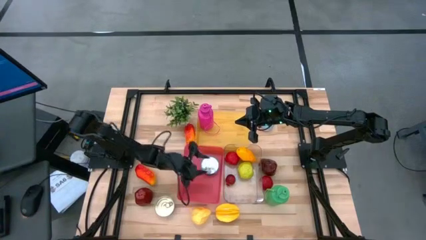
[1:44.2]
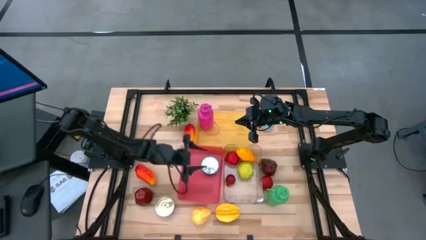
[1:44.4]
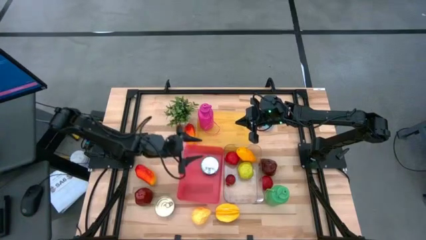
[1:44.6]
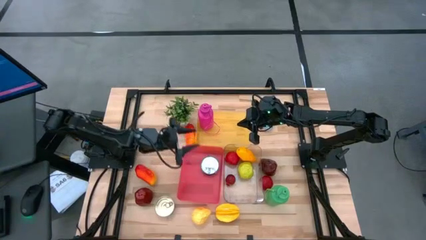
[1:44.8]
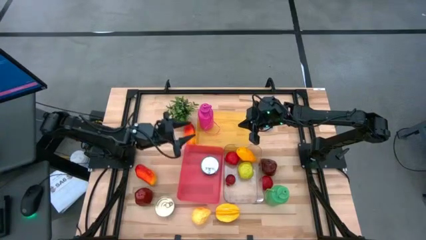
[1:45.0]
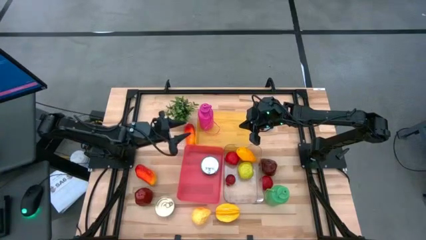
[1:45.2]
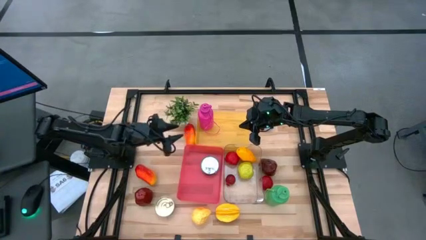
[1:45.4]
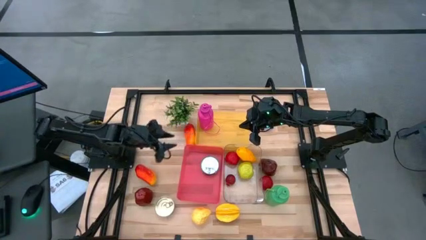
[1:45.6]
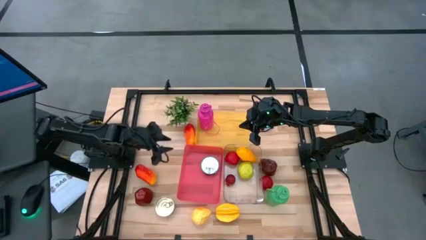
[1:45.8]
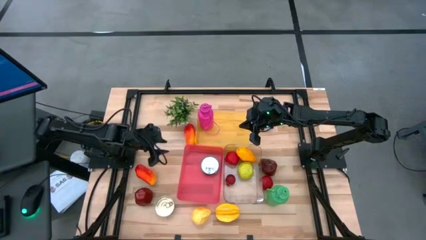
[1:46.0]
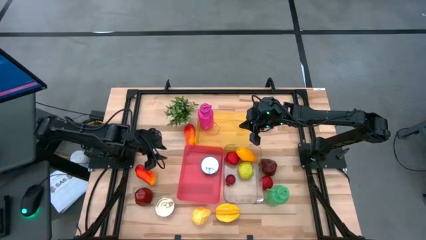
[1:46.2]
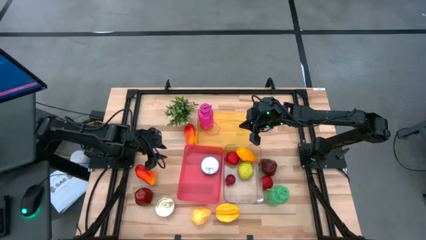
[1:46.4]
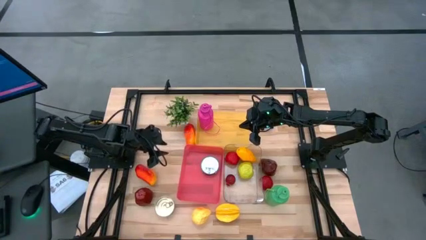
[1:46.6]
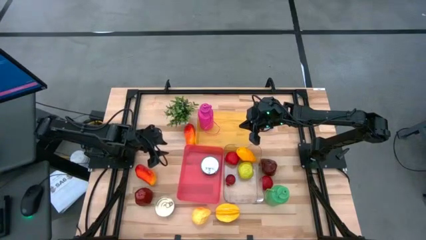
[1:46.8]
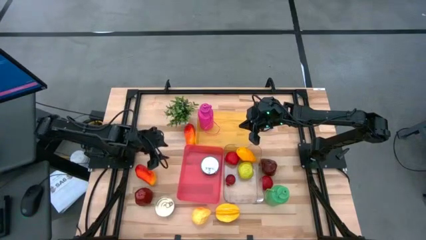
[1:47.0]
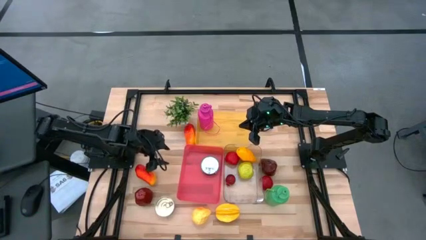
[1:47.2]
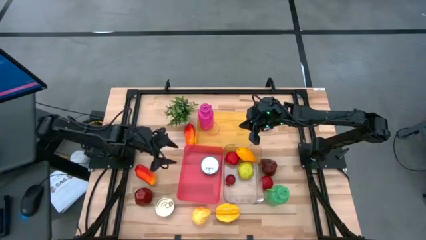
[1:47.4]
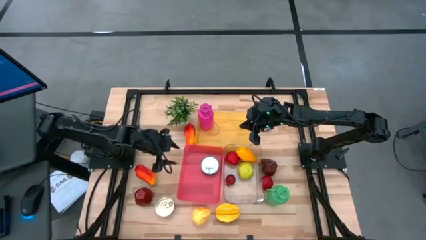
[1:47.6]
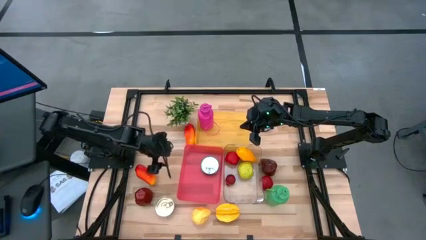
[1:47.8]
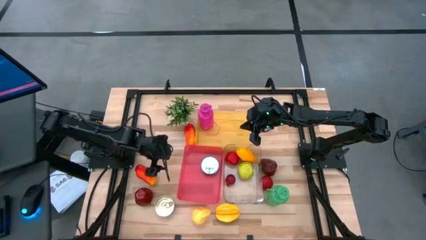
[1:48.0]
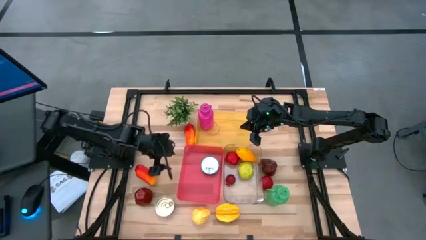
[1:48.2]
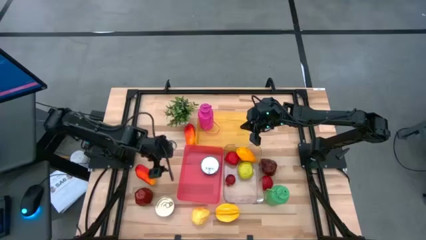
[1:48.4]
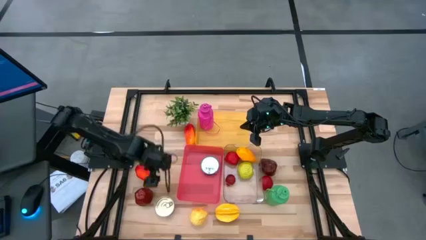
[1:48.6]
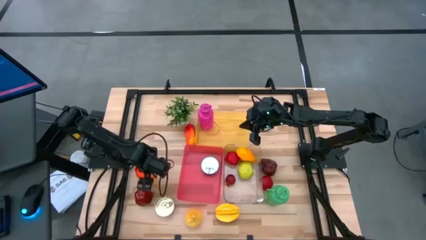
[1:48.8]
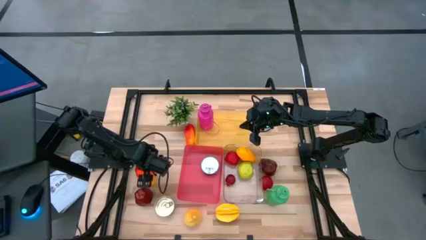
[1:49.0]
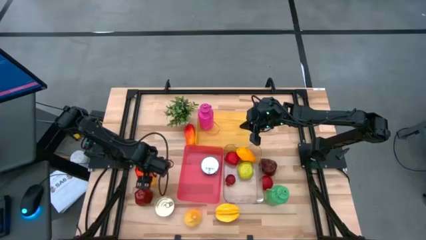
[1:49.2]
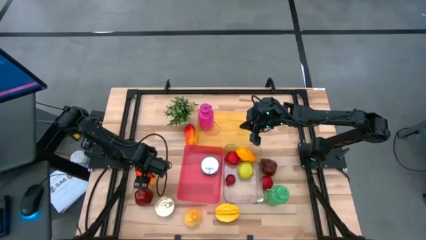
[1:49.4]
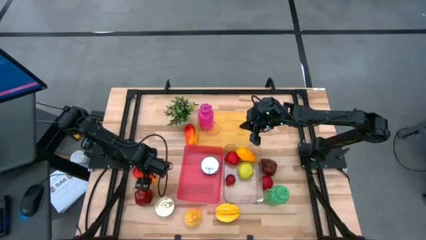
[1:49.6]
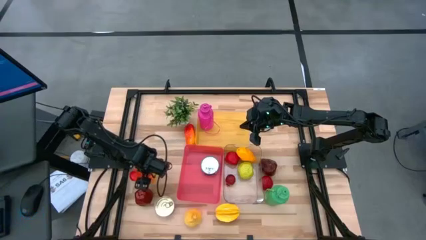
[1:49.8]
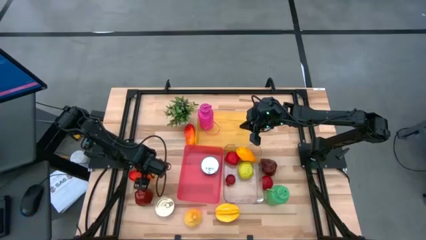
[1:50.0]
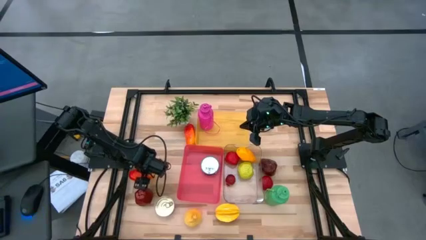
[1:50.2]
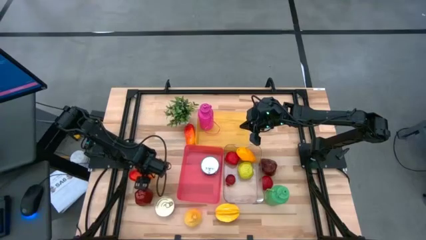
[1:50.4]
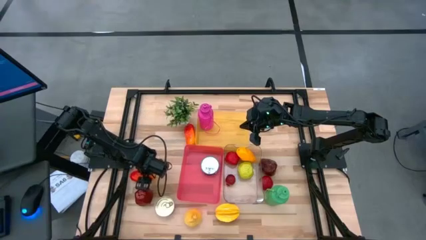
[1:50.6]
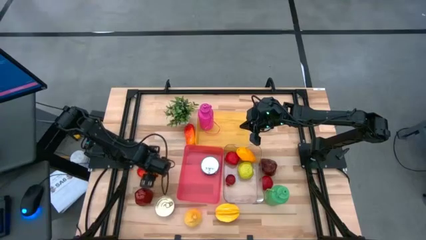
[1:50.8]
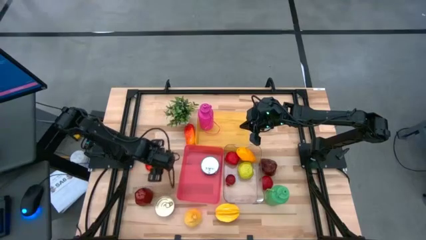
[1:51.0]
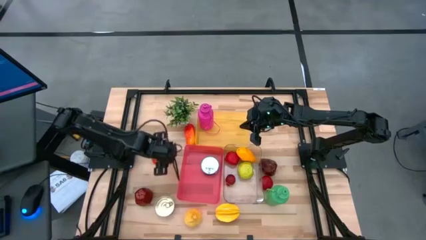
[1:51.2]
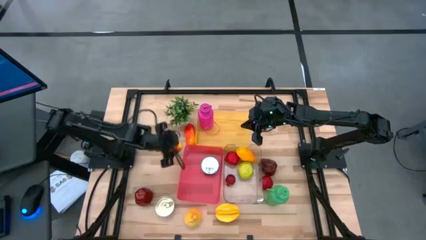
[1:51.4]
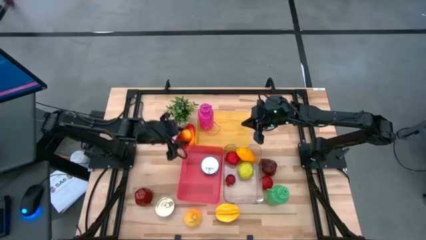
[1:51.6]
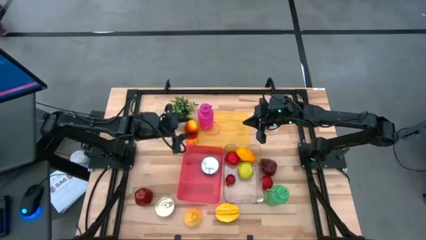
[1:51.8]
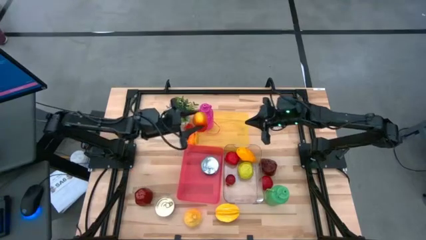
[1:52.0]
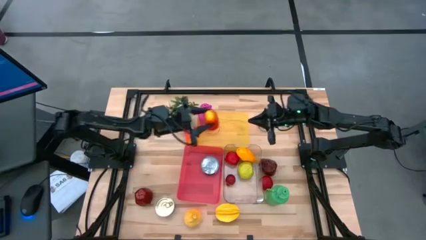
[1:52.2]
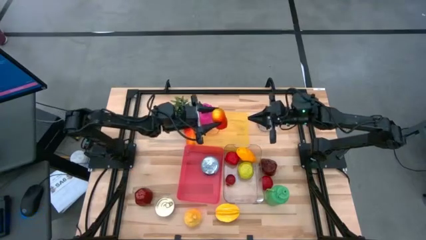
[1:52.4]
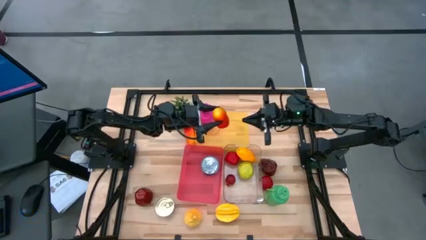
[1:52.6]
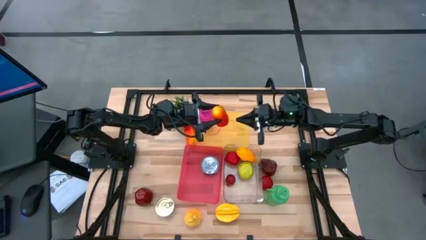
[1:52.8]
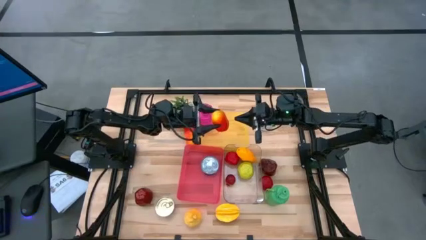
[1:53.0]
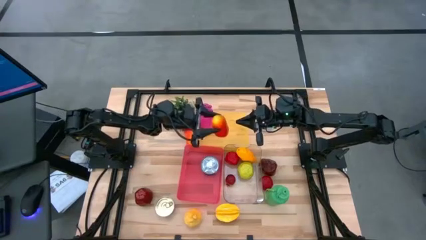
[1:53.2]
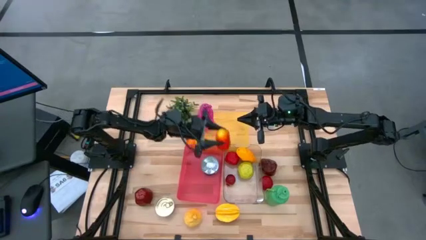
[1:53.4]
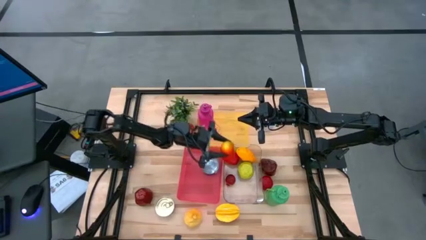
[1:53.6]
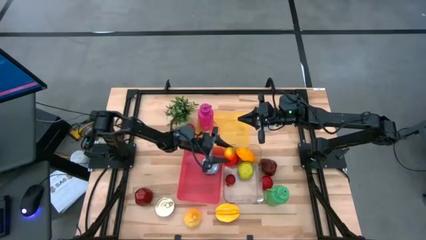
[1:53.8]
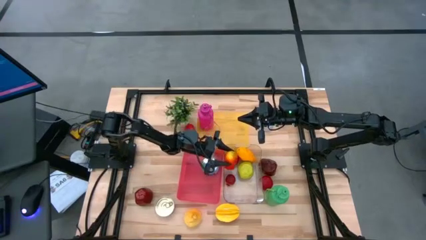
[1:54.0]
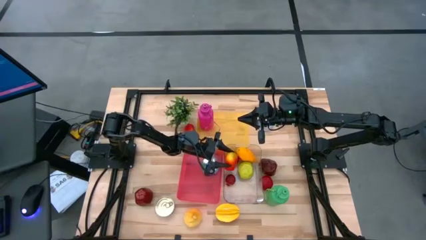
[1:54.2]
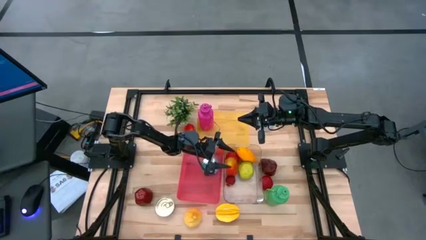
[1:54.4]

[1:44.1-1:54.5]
Task: Pick & Place Food Item
Put the bottom mango on the left into the transparent bin

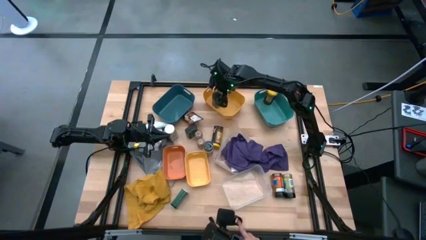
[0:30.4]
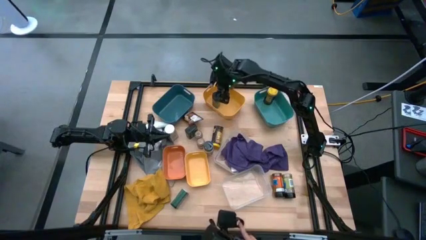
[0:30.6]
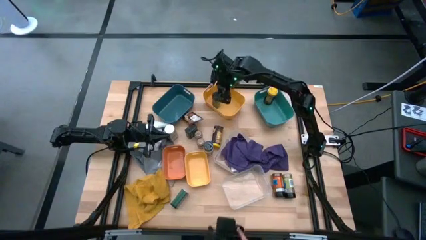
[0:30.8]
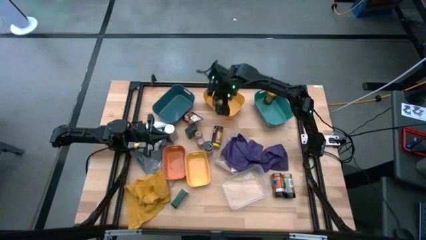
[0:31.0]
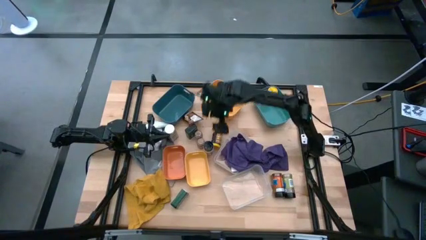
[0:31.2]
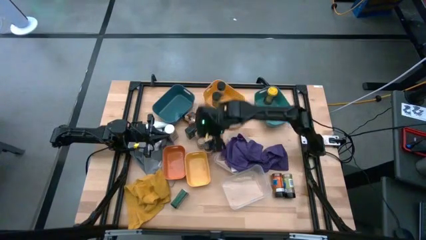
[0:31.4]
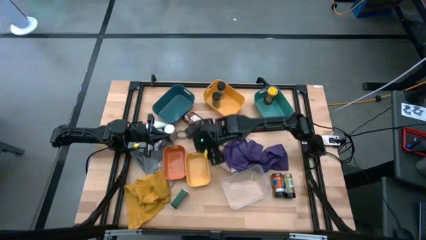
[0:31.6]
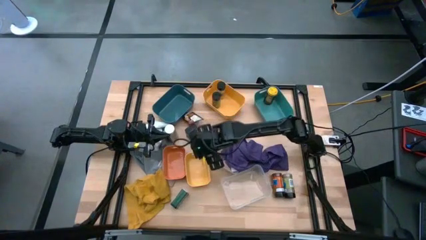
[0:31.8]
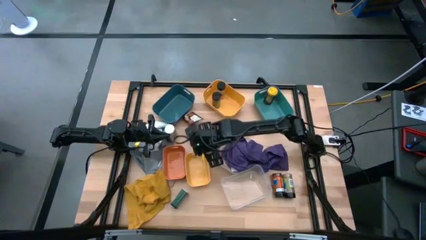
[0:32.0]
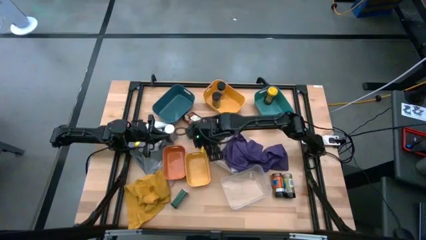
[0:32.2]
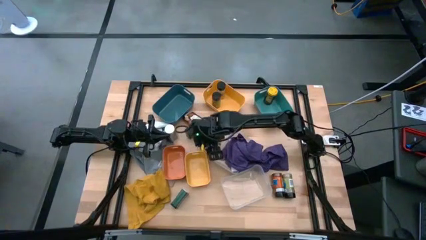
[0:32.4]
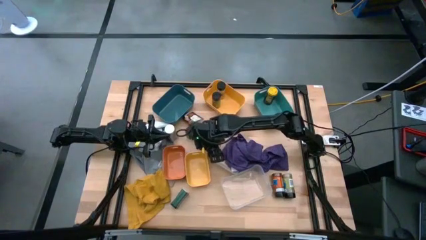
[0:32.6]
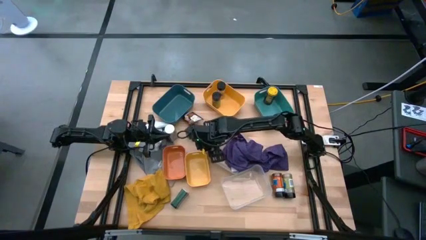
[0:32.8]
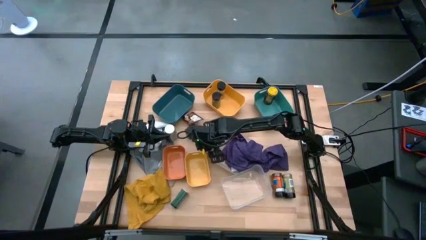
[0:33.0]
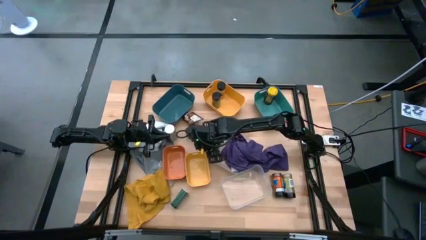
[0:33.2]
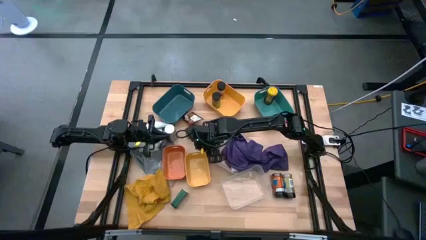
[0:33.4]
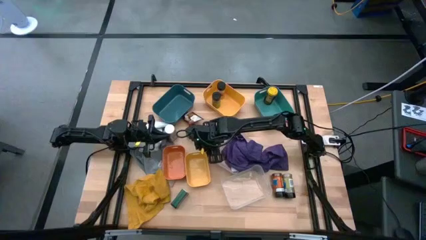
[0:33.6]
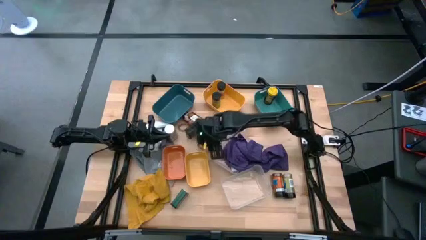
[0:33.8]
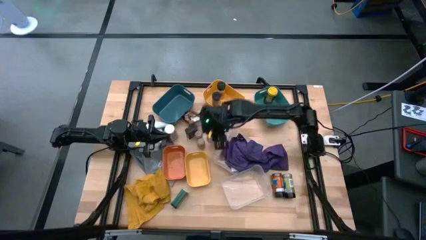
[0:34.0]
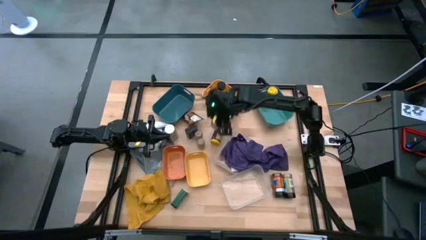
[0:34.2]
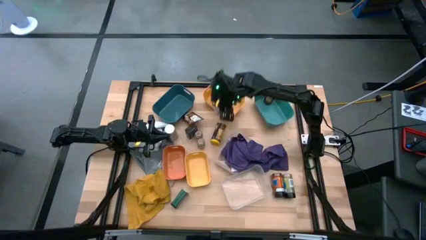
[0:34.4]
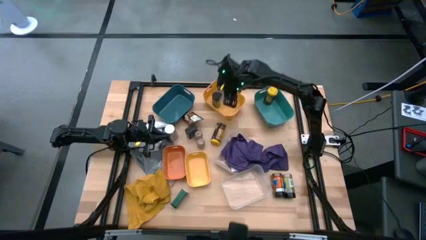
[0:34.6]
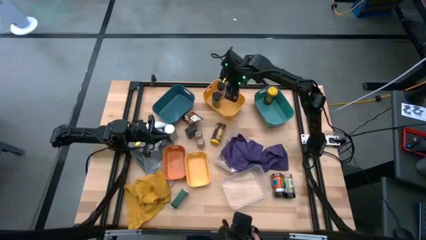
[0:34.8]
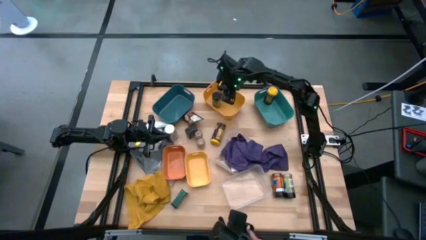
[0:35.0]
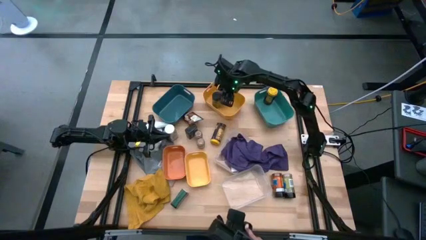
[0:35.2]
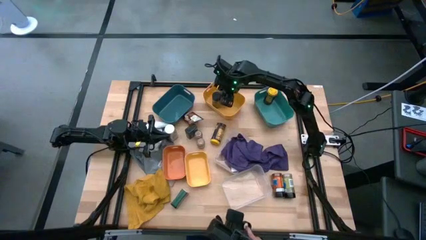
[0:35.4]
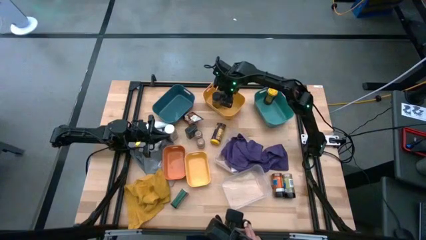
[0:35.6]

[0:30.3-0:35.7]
Task: Sort spices by type
Put the violet spice bottle into the yellow bin
